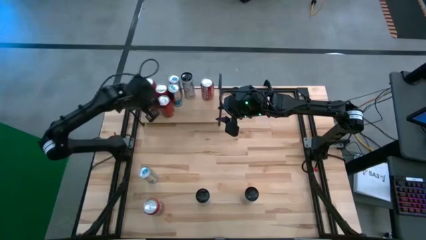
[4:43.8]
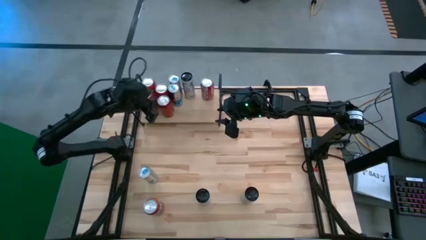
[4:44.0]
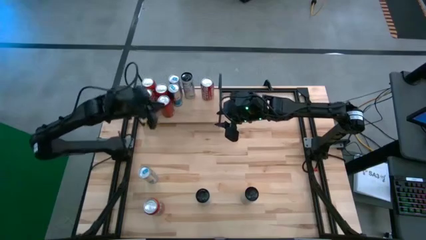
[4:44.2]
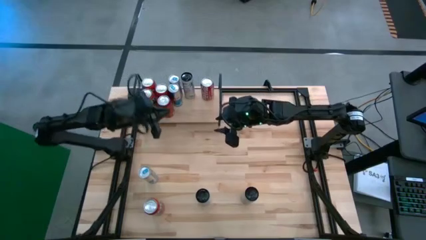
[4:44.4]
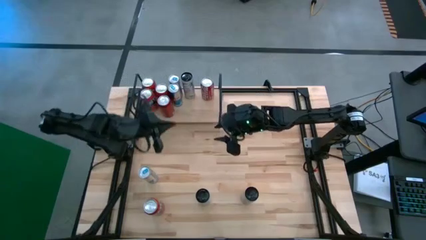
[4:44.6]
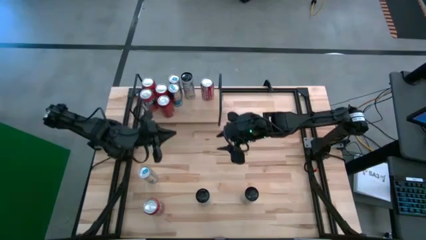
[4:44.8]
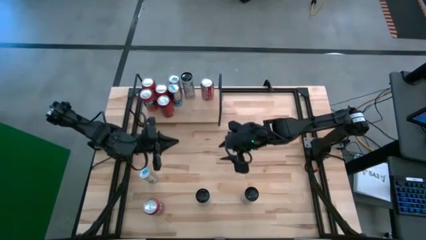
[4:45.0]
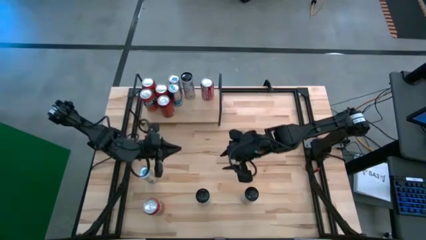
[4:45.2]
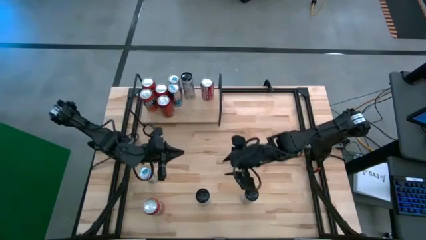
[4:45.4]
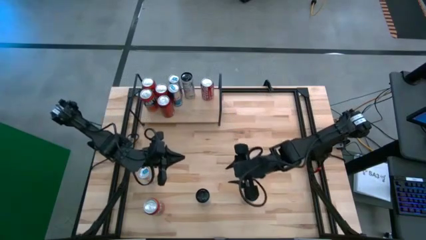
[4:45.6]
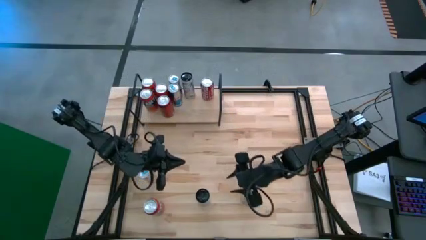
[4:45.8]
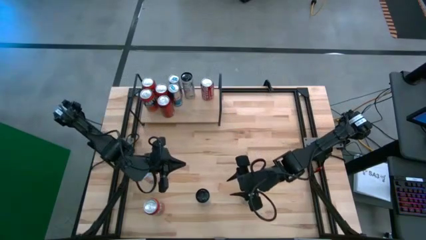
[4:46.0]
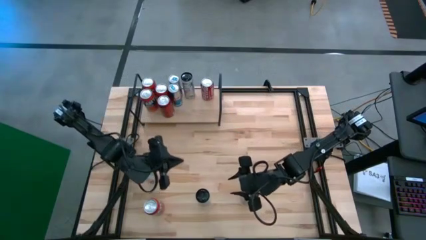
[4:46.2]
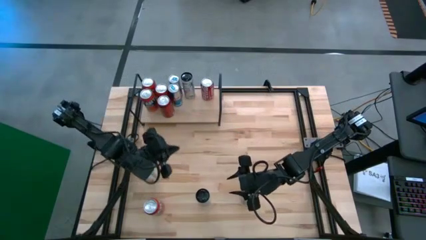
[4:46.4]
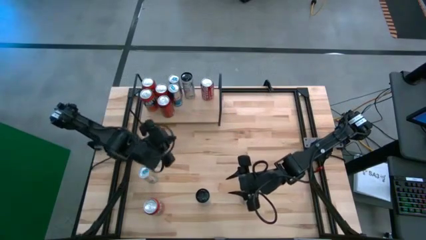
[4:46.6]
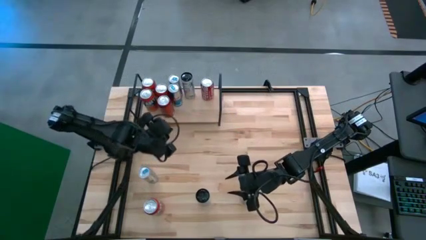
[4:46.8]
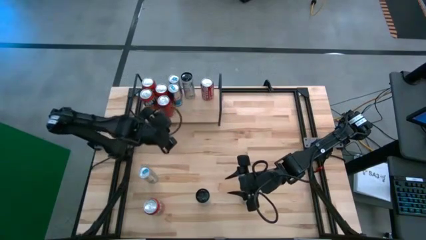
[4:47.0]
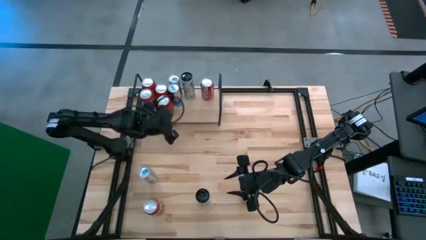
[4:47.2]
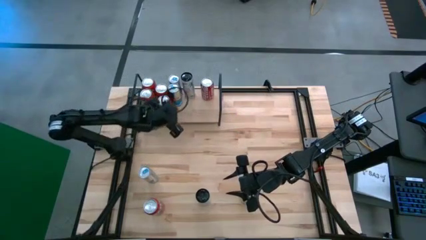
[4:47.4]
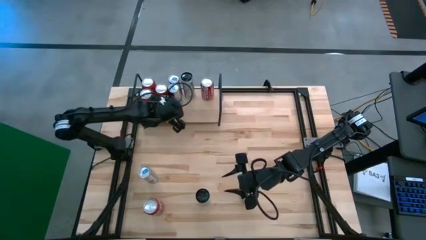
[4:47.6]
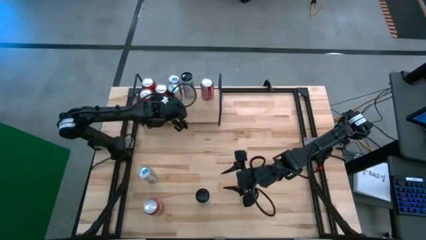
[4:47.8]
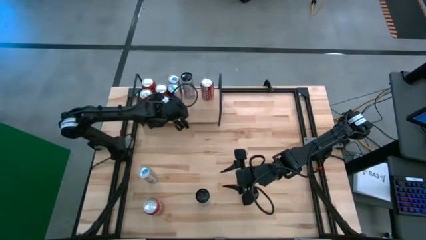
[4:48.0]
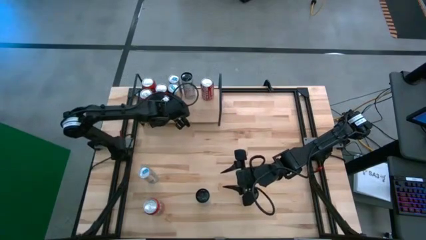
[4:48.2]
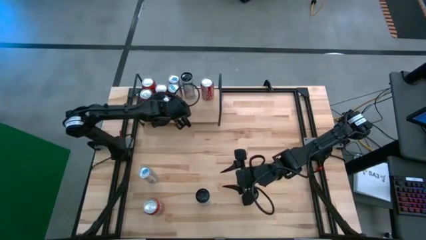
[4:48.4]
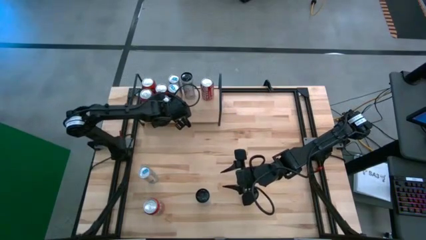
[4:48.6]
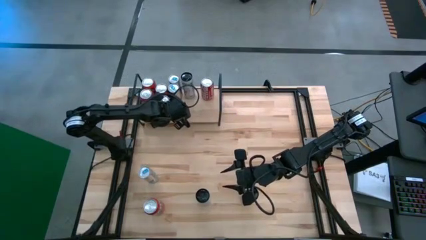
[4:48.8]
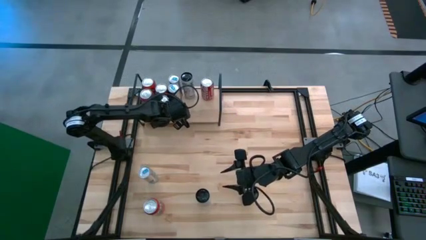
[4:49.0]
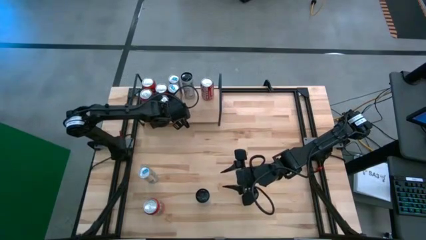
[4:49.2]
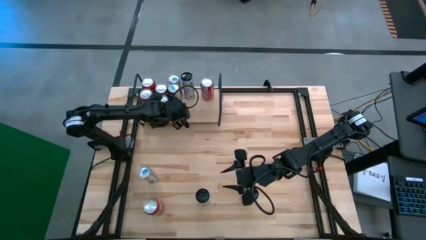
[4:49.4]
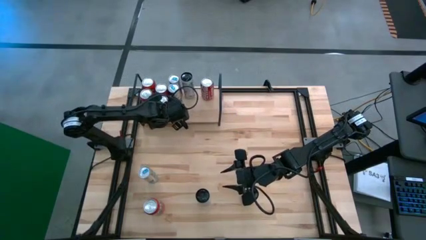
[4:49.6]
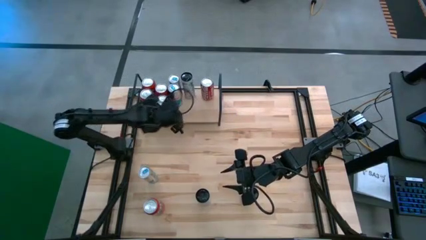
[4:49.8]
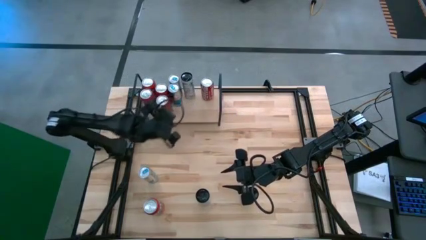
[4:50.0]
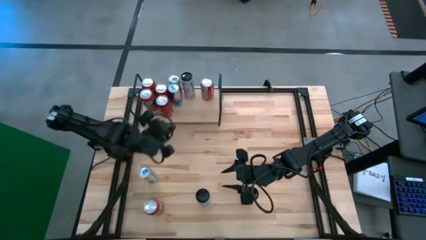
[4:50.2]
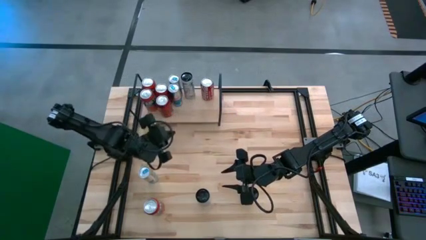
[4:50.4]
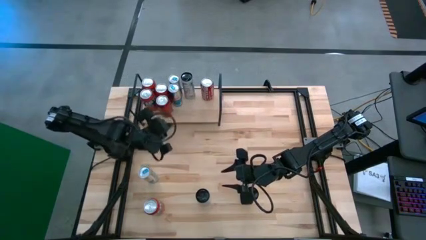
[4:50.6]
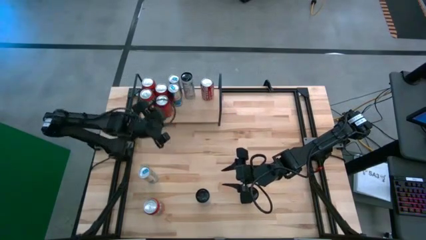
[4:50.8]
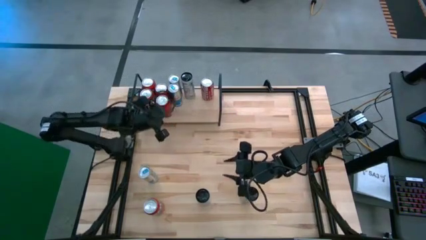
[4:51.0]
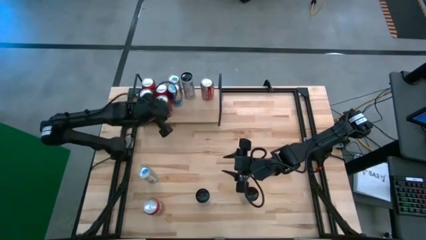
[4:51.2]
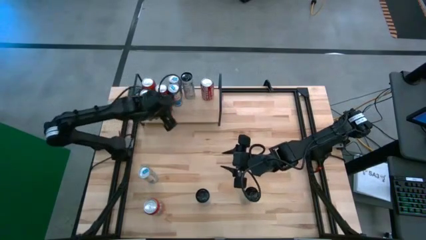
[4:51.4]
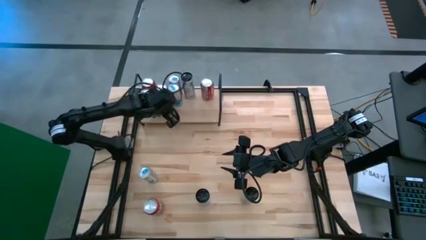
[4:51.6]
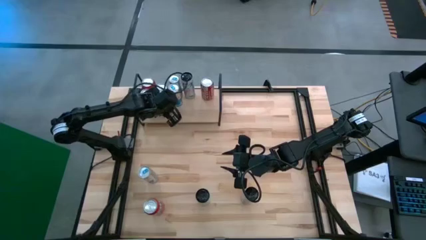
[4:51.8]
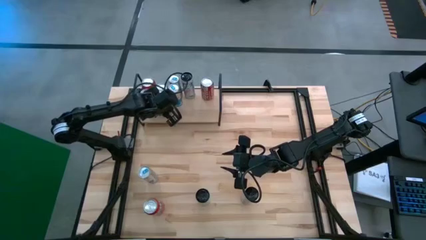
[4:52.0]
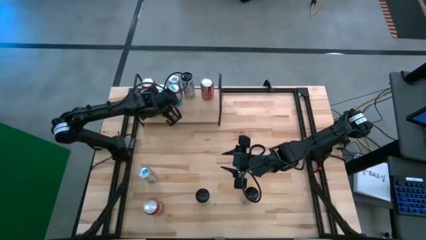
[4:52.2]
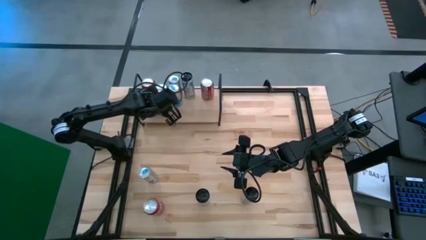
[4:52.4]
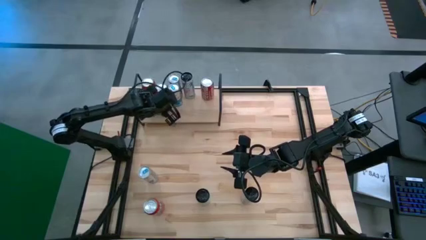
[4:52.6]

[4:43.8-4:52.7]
Task: Place canned beverage on shelf
Adjust the red dark soda can on the shelf

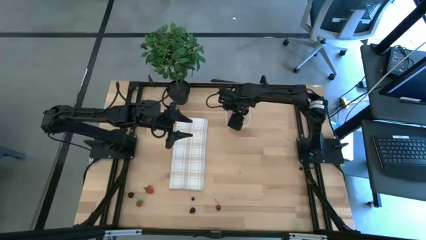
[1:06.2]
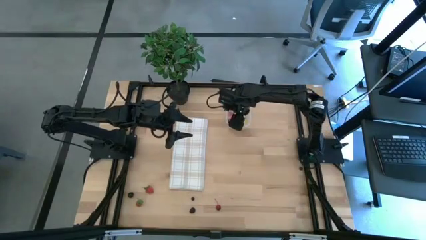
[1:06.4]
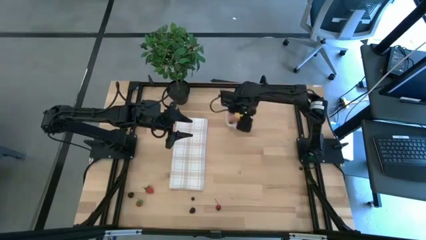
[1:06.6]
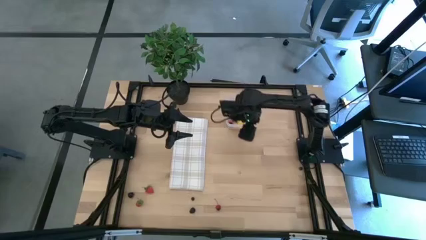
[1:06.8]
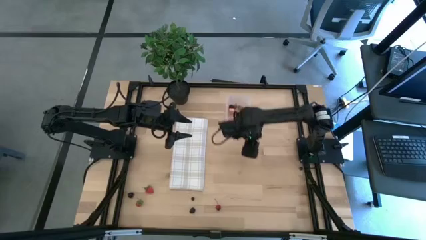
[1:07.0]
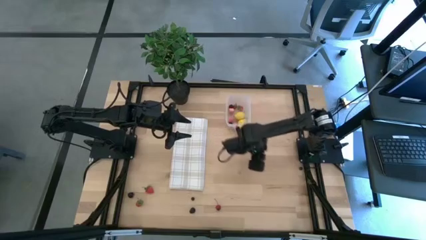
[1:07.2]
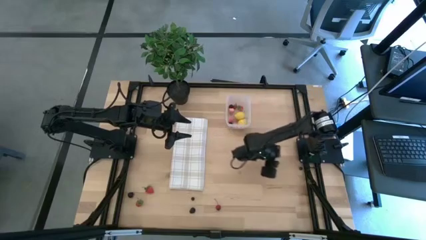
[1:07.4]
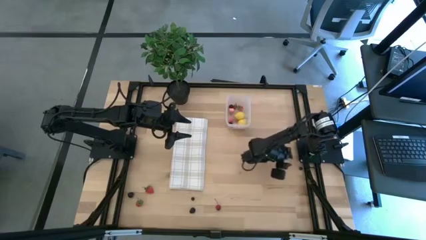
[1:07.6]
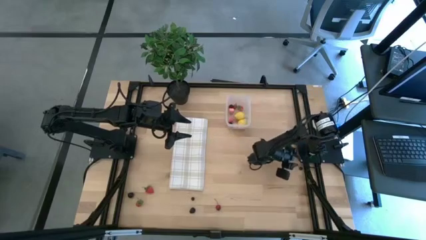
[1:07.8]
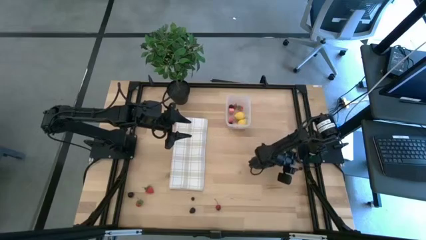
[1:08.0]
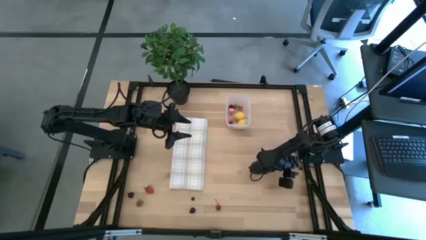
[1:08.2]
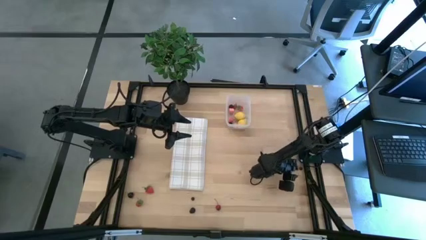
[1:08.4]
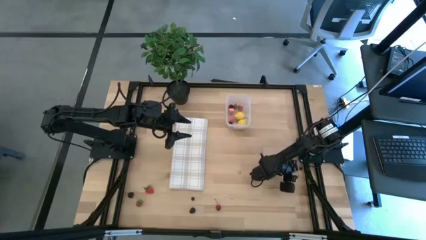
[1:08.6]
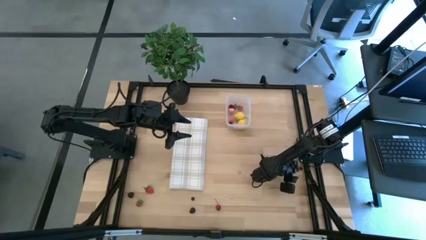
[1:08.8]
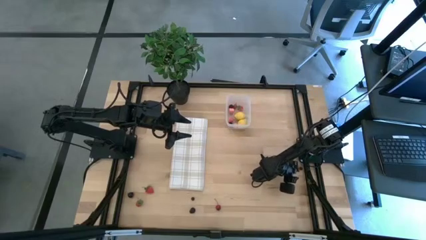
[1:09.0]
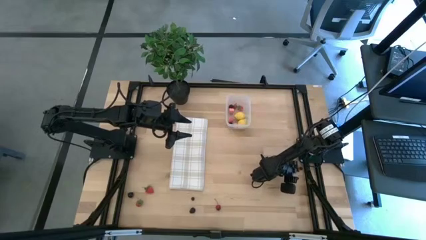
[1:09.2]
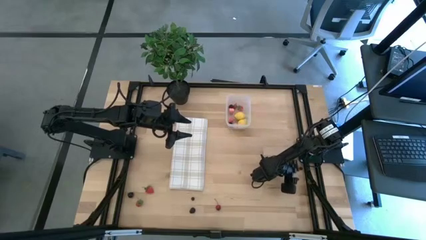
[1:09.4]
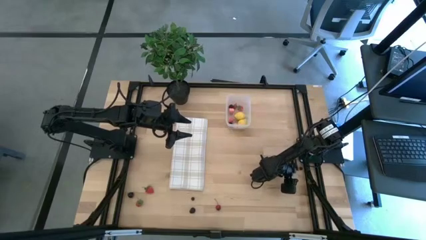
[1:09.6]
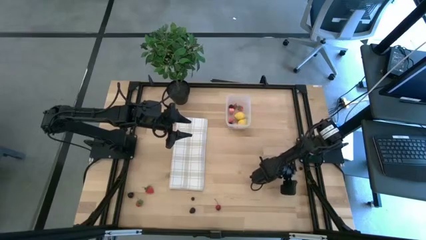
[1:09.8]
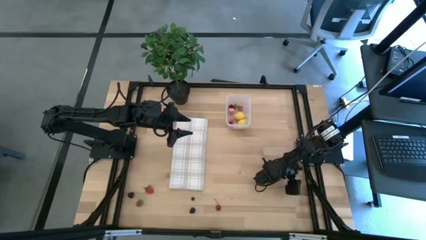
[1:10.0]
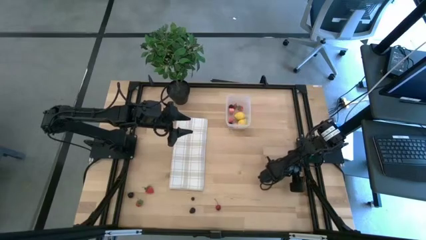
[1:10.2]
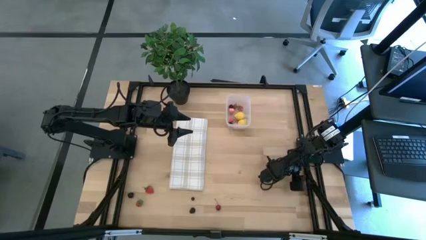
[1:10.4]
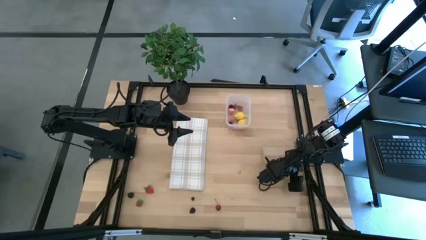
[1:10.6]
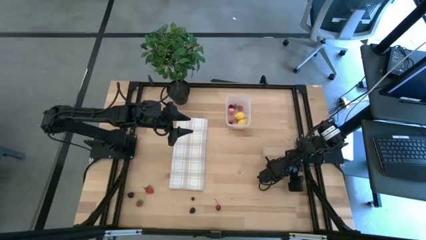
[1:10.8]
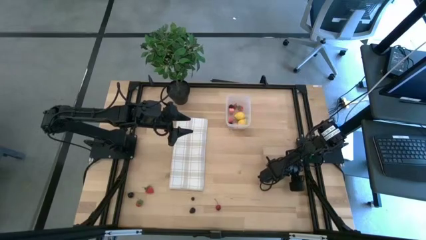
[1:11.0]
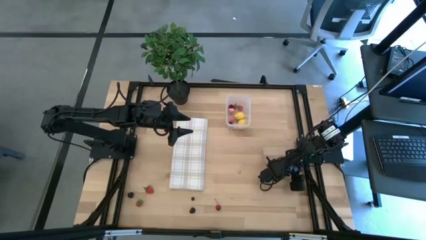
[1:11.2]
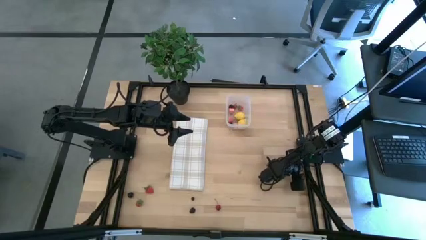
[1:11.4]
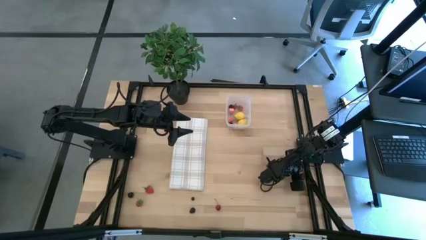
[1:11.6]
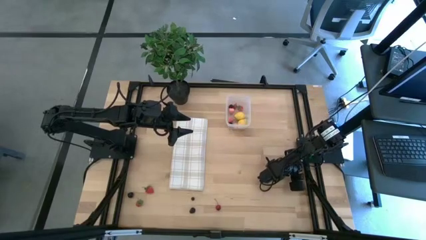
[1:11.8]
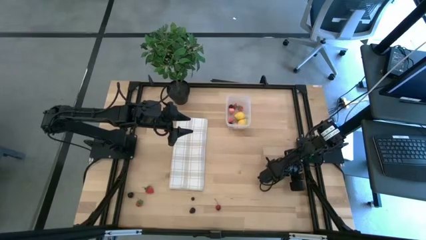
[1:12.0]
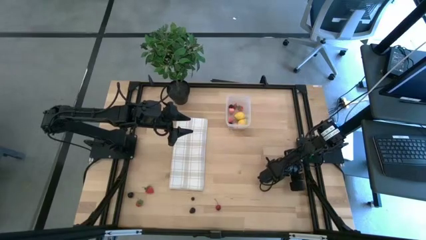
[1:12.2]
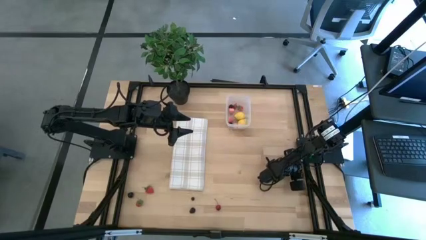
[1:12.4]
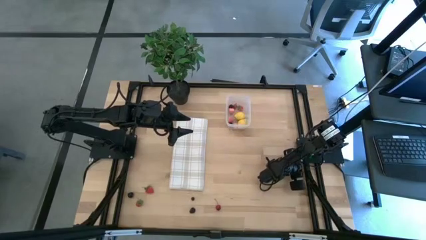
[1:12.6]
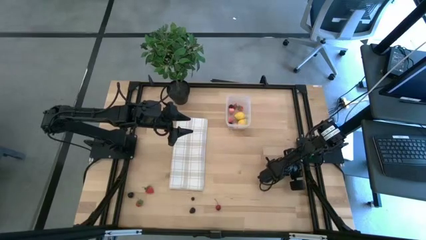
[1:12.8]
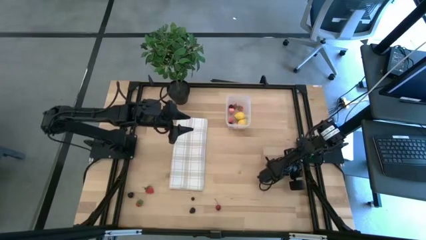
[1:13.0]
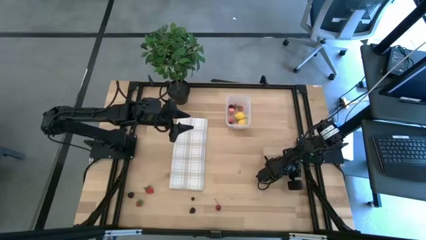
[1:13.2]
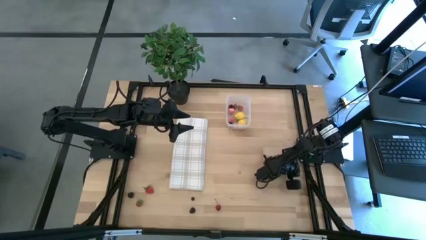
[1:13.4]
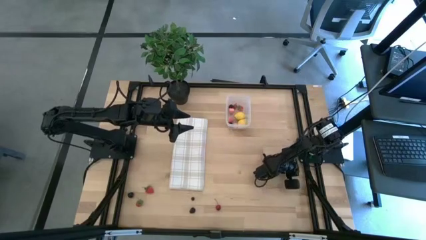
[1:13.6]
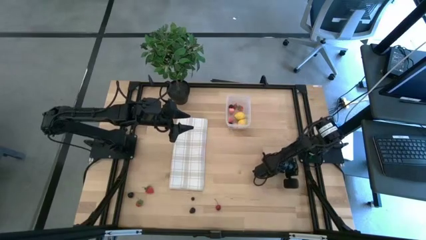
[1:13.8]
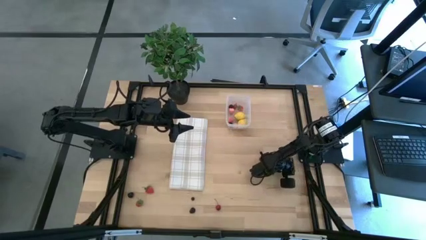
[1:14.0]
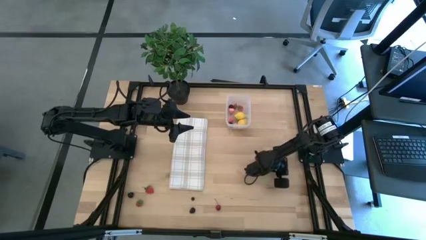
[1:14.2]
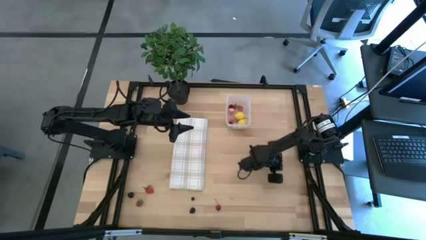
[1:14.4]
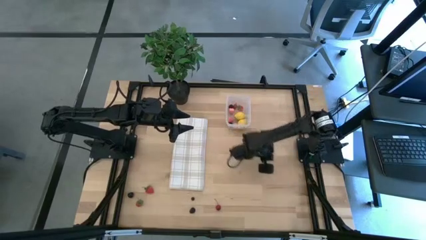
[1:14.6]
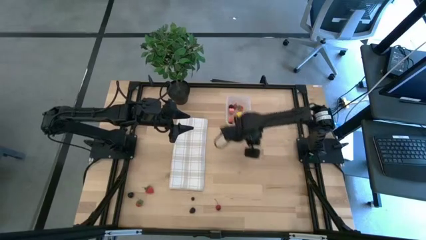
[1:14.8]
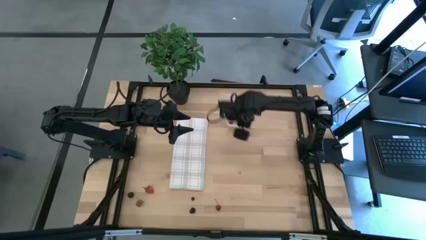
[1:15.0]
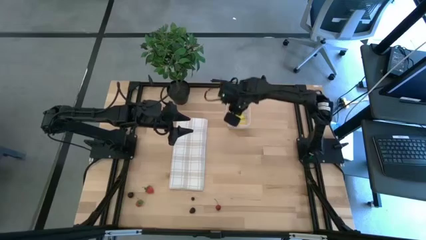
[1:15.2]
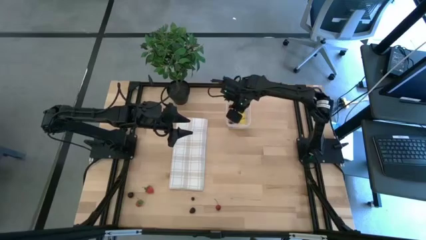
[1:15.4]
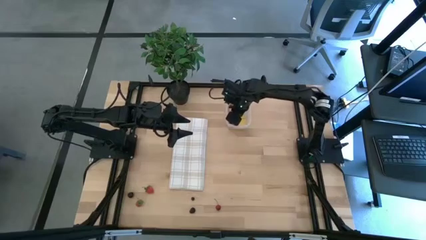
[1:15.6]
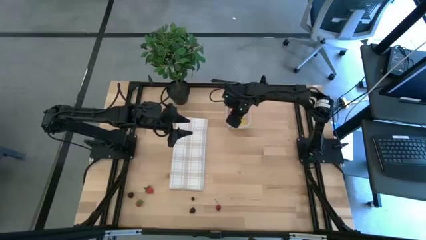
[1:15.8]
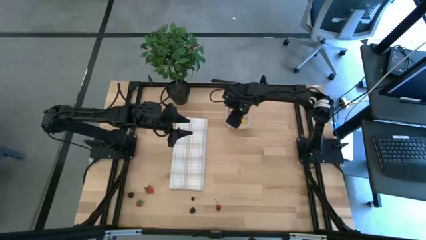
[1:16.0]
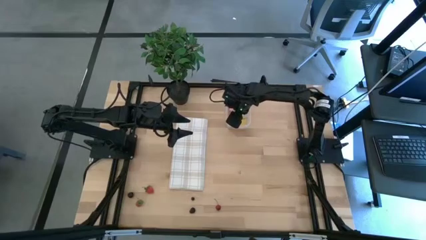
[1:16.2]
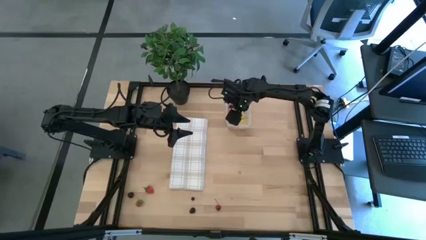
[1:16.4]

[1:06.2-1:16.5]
Task: Pick and placing Produce into tupperware
Put the right blueberry into the transparent bin
